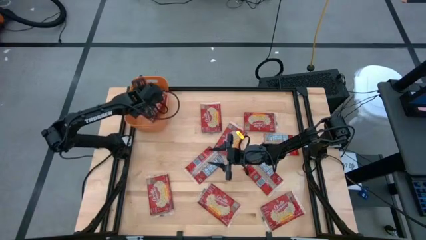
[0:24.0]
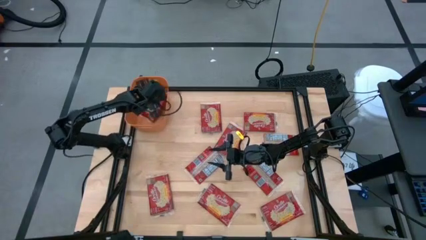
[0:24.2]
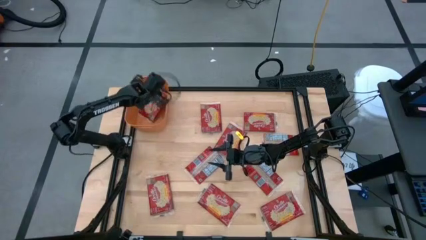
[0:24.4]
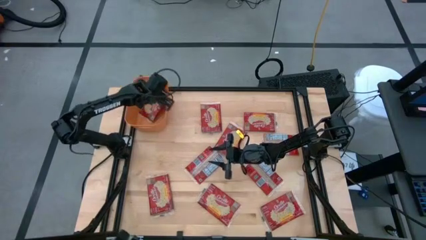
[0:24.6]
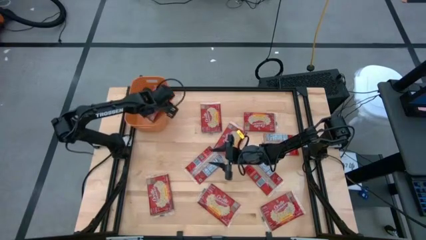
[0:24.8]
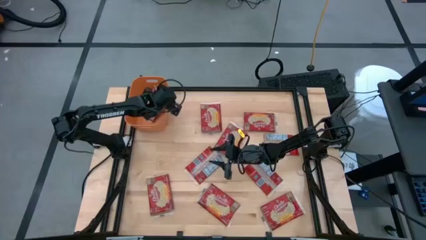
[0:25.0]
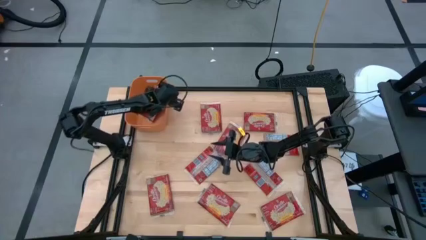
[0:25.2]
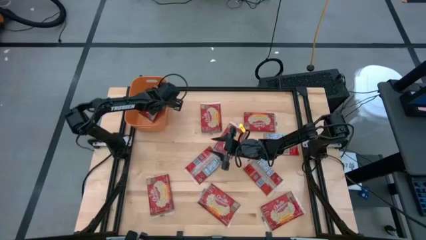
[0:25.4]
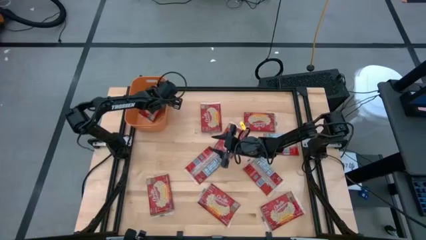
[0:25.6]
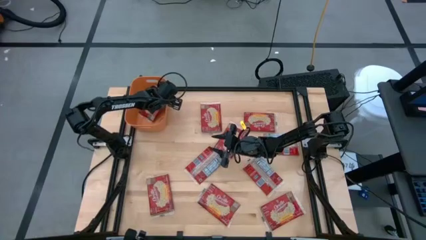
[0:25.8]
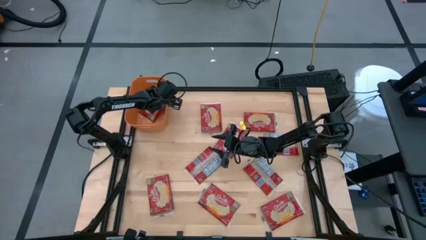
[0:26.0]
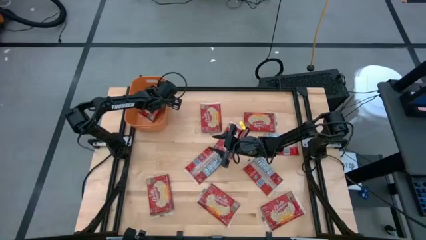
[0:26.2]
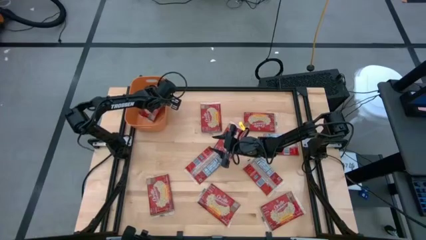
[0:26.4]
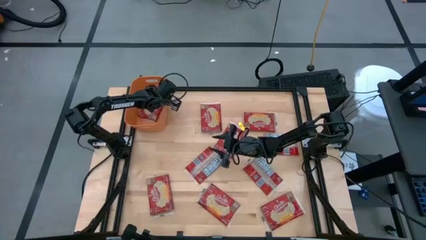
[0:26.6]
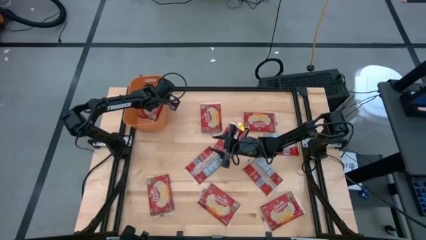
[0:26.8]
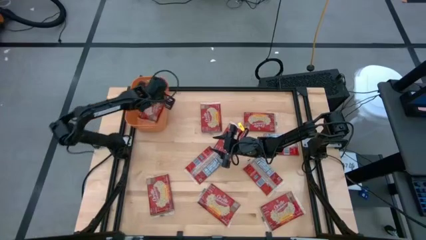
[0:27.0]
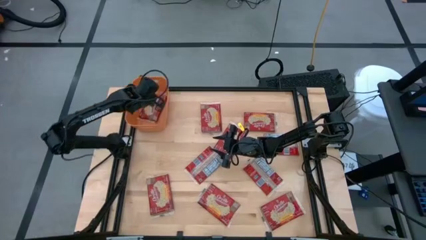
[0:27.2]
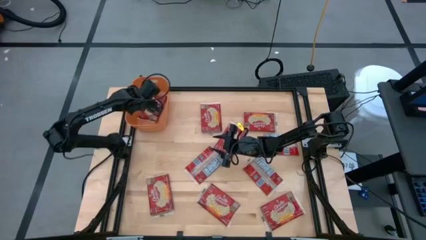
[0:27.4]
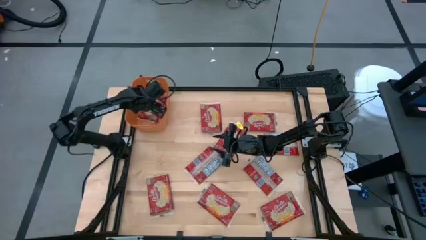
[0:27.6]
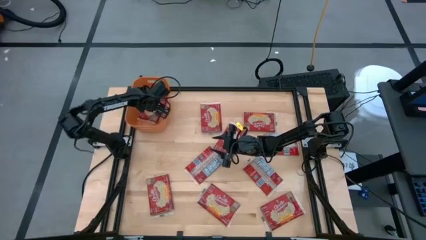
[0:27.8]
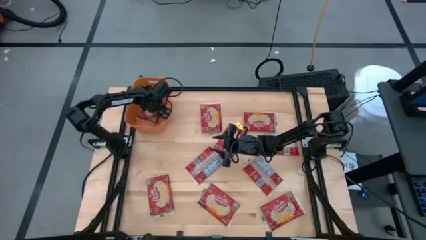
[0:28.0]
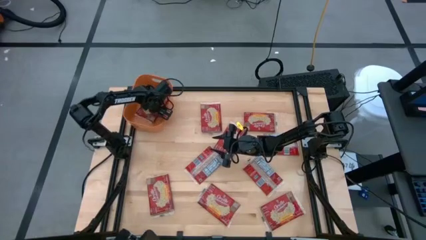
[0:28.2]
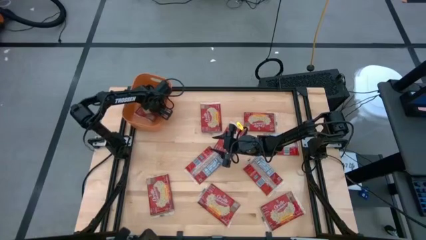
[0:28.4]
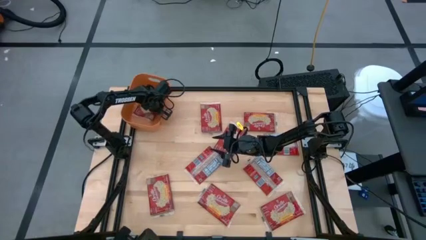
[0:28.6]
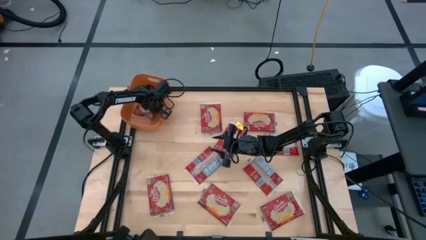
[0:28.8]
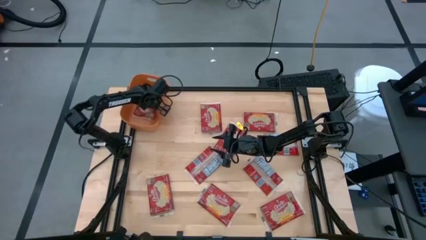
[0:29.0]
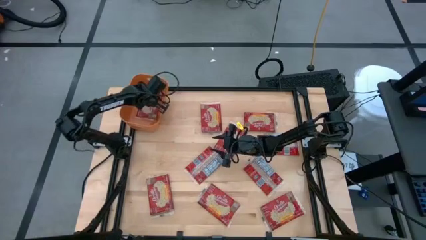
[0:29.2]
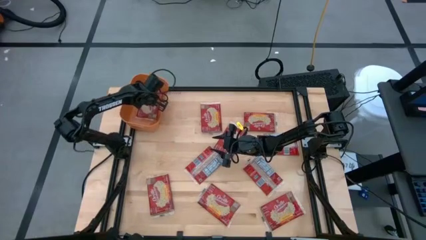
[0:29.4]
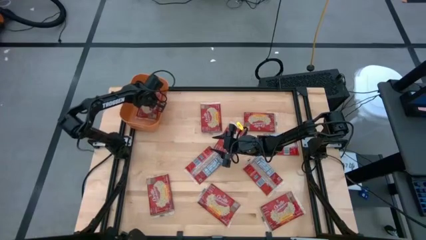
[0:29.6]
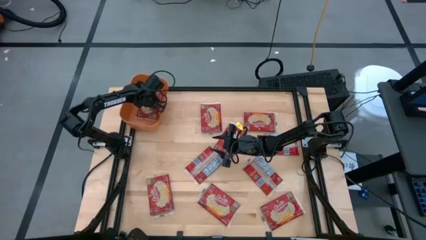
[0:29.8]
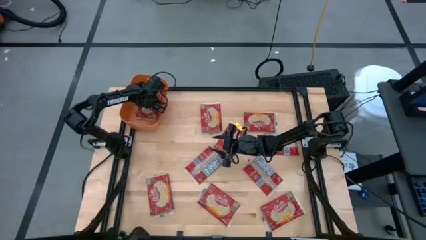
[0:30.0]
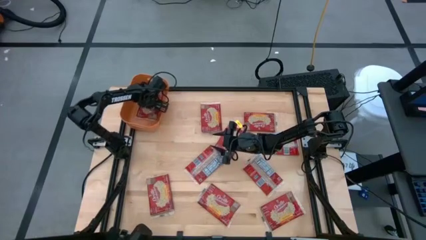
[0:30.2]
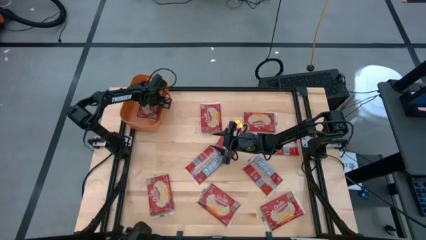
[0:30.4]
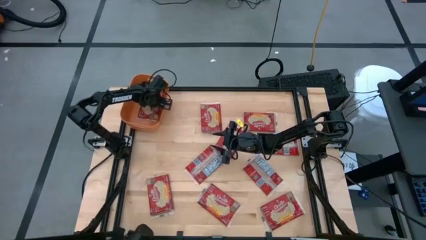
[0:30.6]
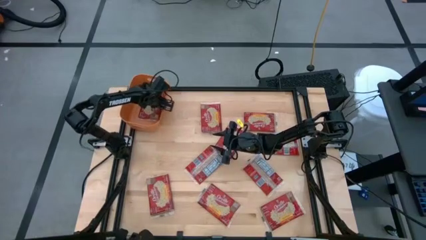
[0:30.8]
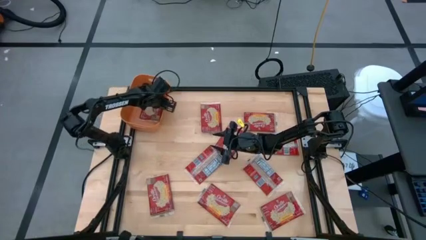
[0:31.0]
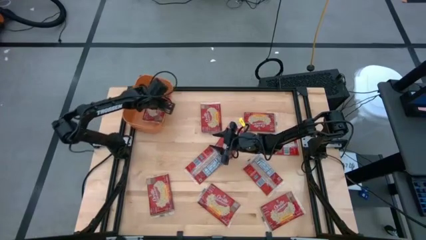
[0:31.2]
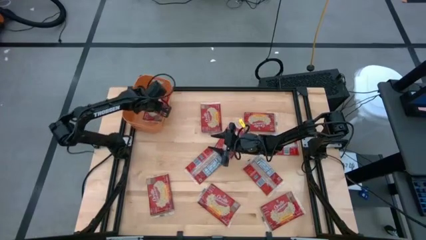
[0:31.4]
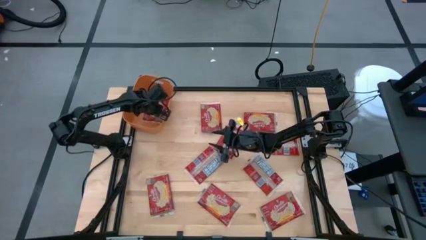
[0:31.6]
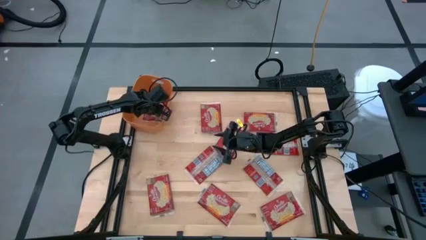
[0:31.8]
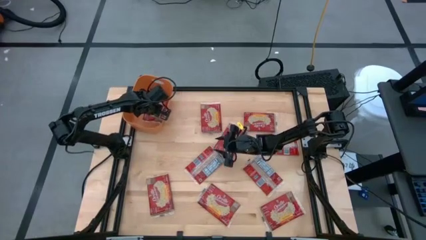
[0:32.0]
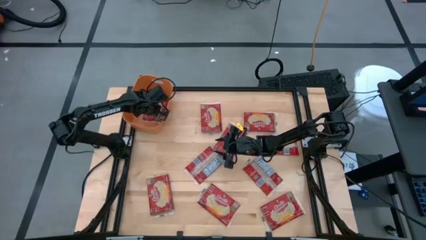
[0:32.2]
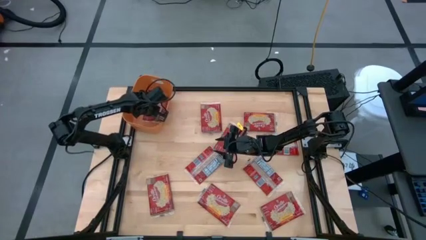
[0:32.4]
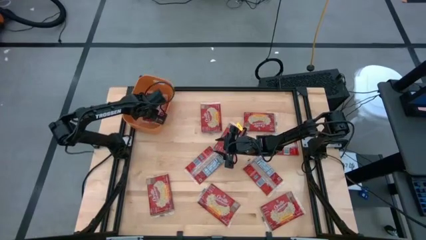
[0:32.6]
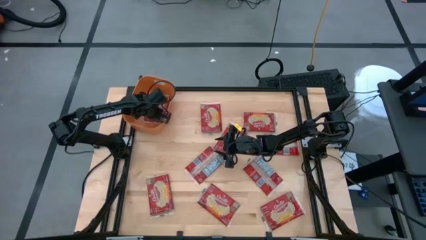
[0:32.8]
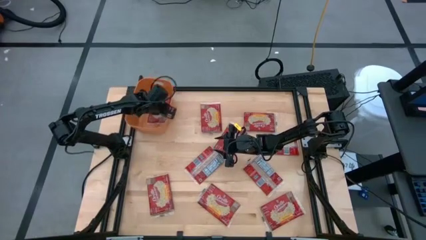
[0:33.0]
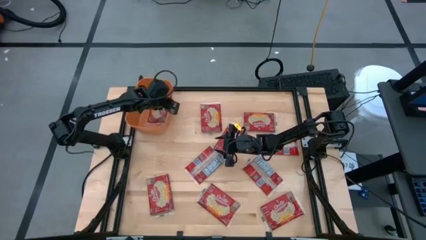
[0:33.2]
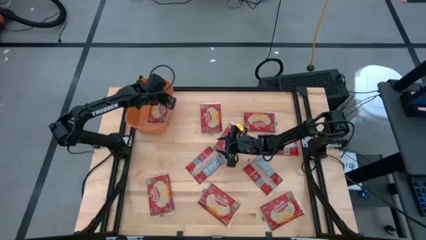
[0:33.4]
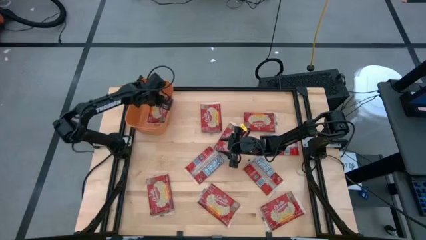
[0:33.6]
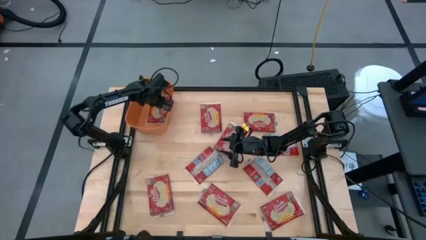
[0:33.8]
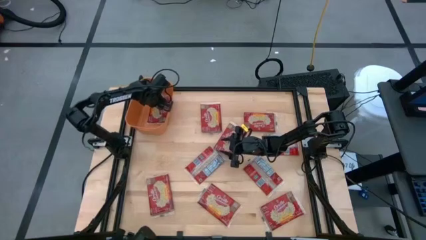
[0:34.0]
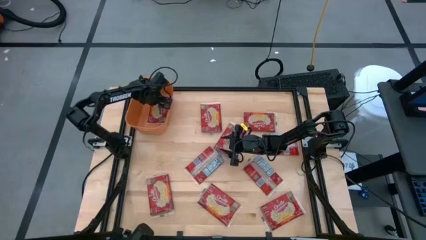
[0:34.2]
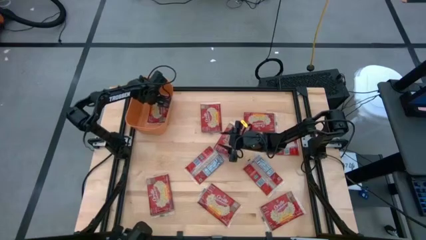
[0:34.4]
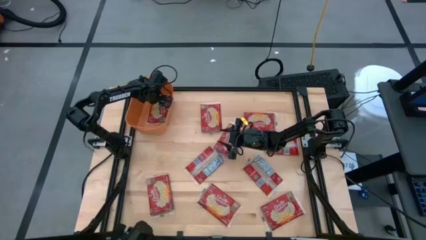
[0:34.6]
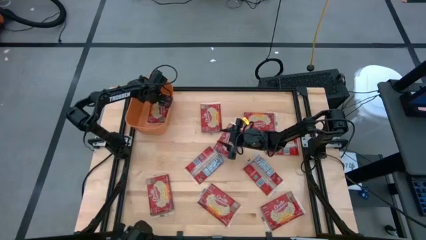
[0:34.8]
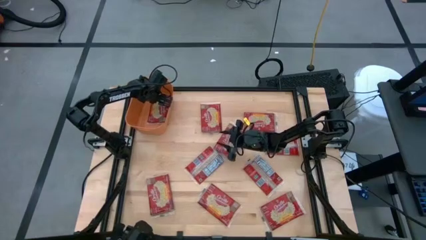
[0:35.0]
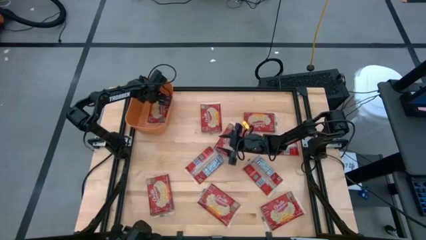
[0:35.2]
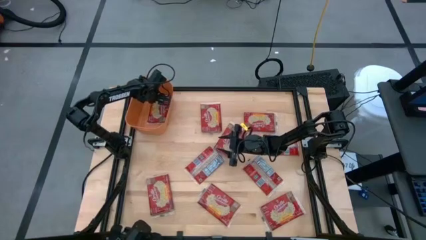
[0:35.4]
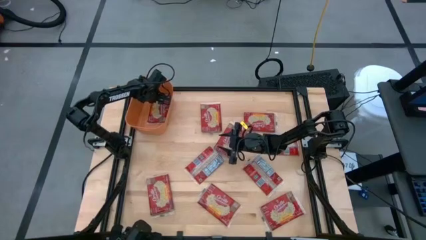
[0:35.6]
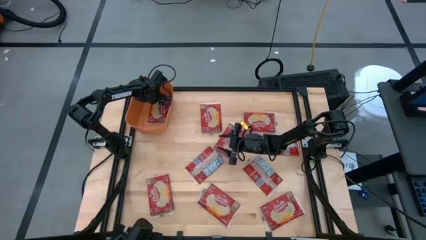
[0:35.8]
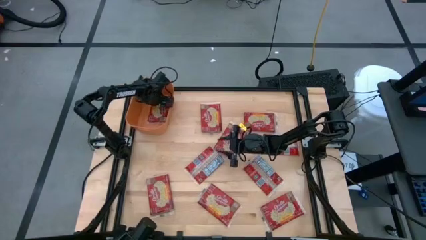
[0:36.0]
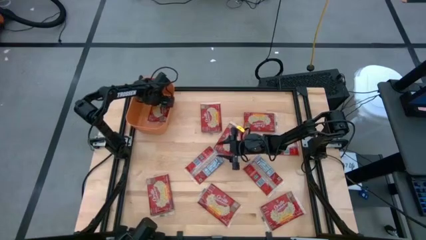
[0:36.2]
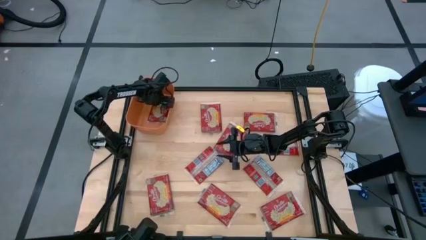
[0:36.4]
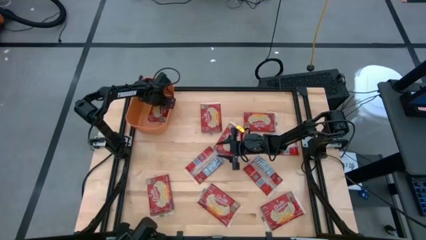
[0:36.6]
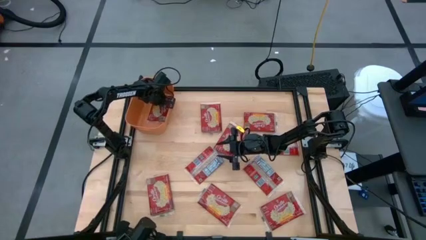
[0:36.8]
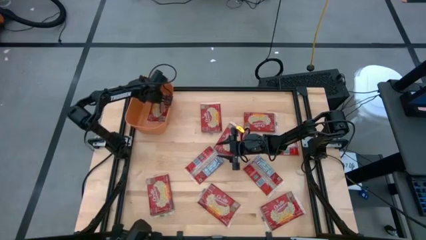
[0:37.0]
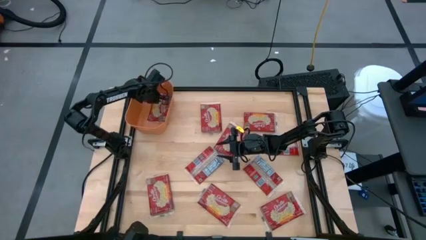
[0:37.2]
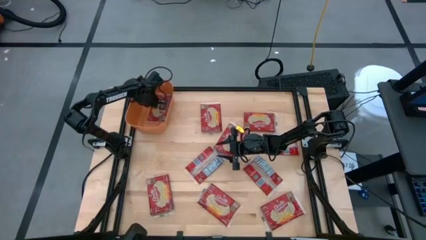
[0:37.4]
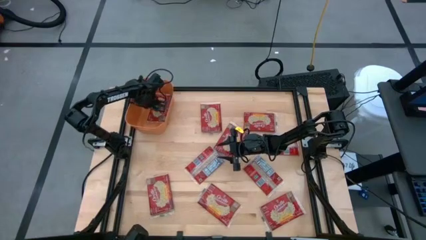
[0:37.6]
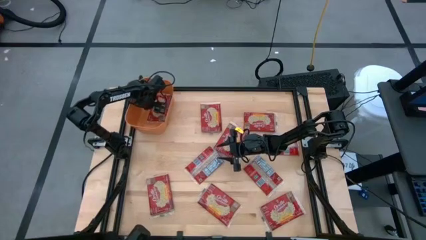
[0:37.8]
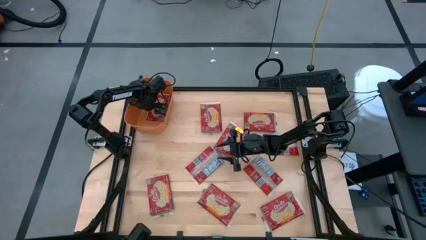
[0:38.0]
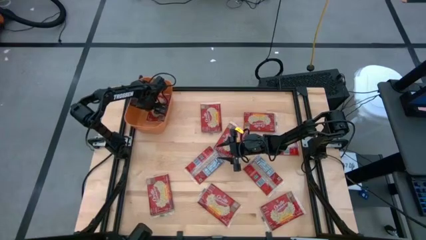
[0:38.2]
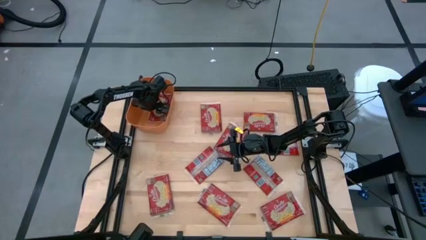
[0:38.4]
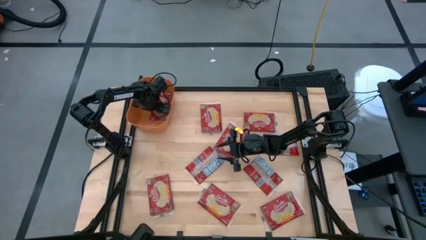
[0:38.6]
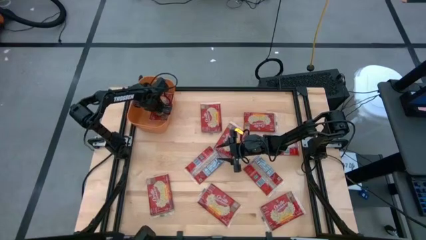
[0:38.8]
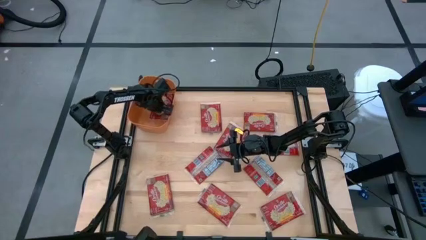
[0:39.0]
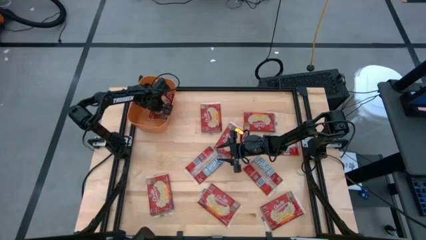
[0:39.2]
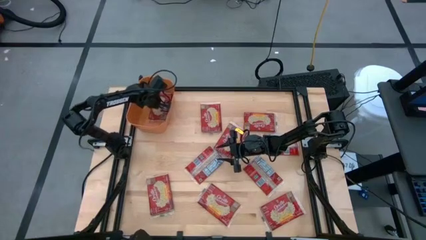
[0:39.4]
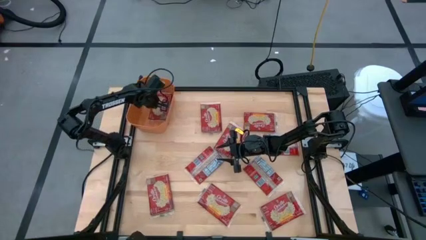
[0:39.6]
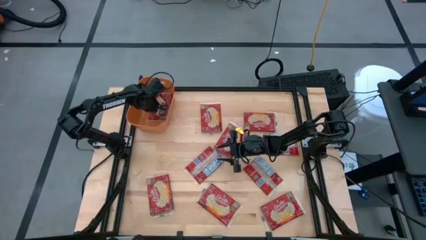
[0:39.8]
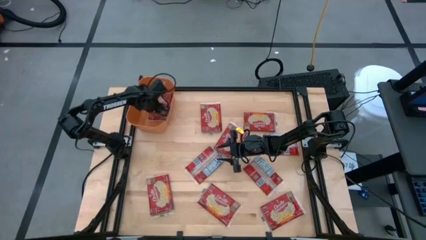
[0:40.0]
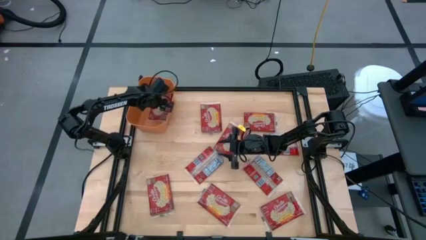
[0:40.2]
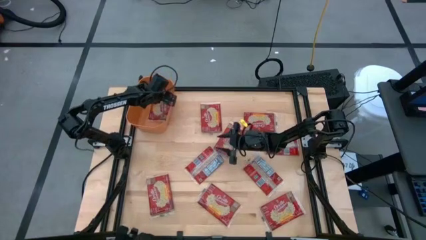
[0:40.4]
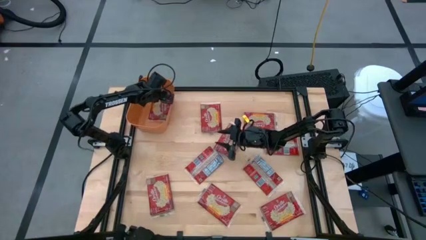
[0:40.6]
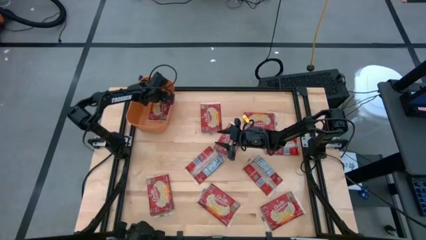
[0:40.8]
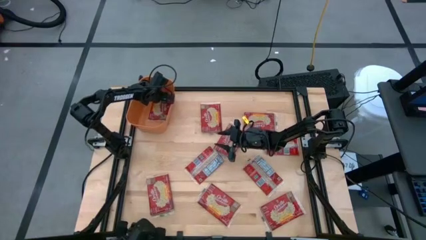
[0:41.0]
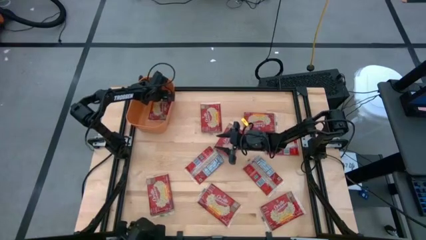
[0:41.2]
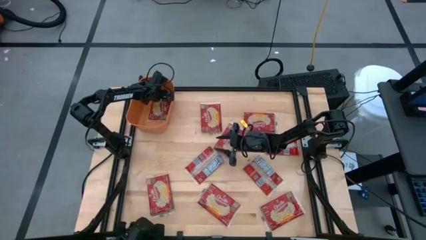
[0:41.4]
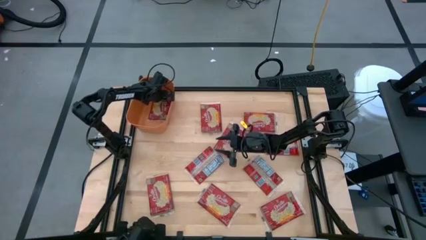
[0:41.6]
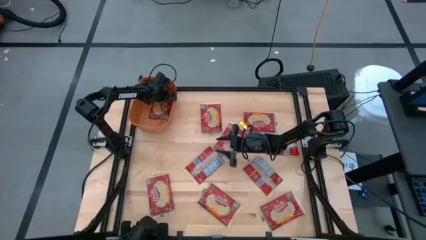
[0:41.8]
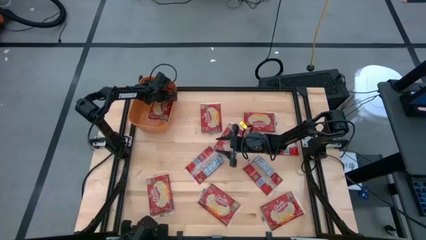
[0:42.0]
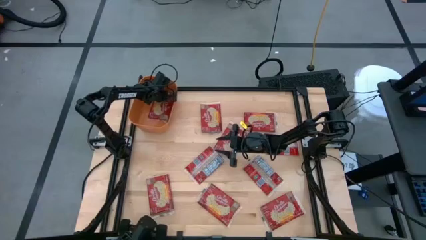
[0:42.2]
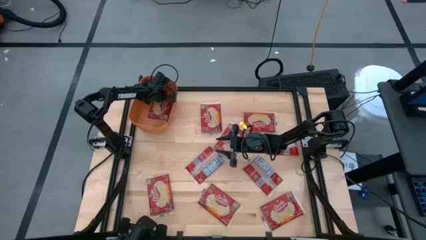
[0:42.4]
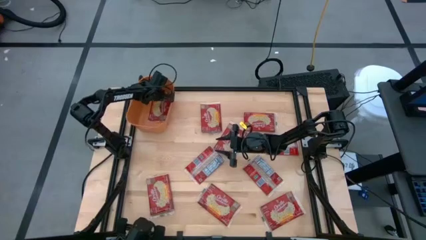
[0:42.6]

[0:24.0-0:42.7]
Task: Sort popcorn bags into baskets
Put the red popcorn bag into the orange bin
